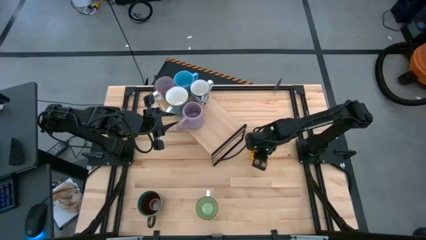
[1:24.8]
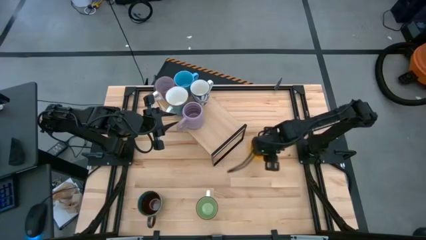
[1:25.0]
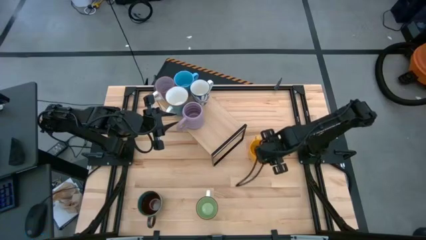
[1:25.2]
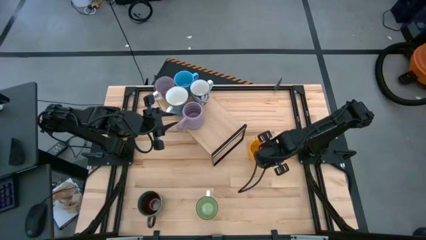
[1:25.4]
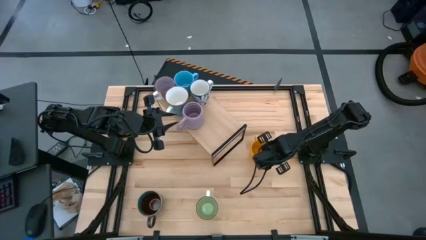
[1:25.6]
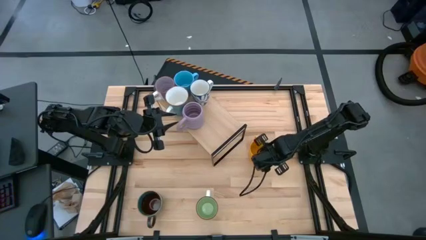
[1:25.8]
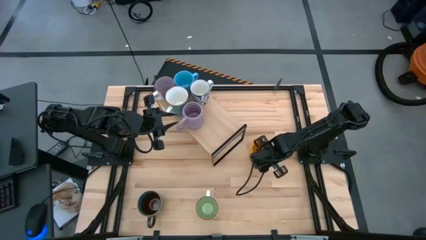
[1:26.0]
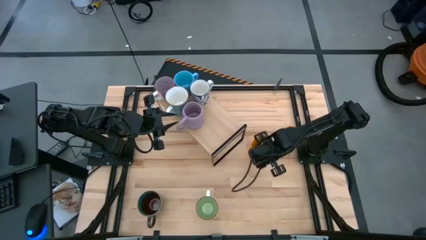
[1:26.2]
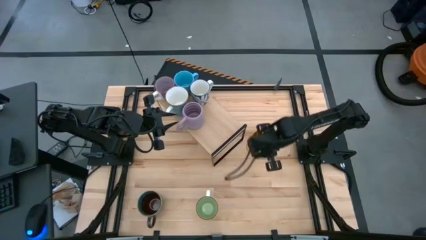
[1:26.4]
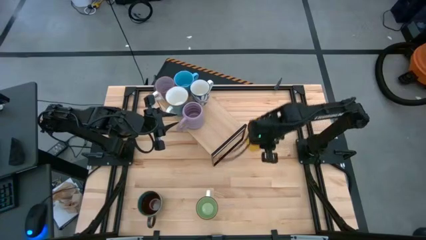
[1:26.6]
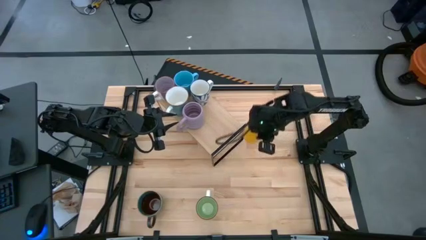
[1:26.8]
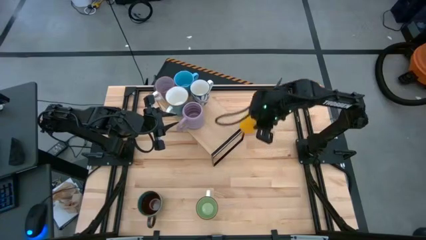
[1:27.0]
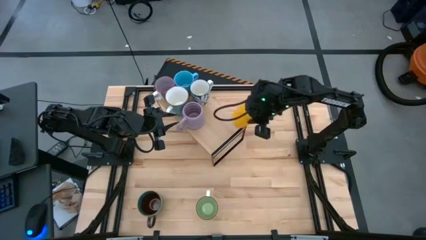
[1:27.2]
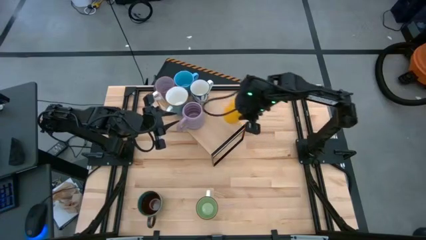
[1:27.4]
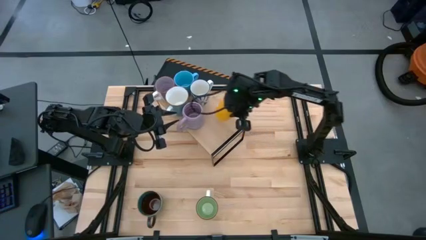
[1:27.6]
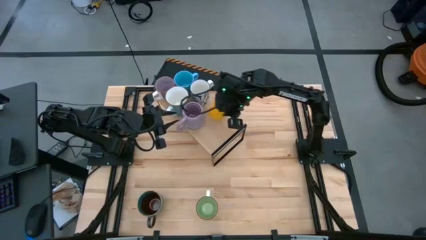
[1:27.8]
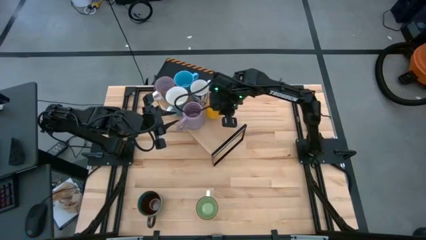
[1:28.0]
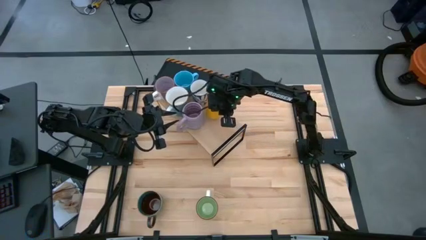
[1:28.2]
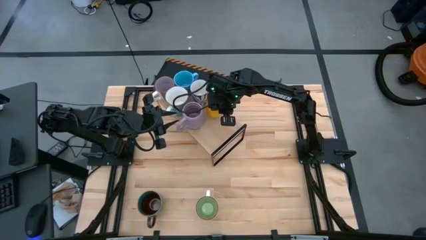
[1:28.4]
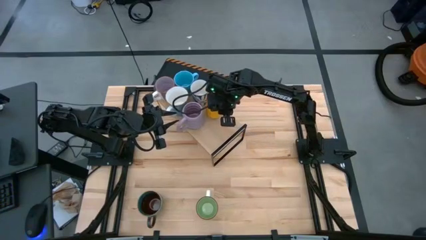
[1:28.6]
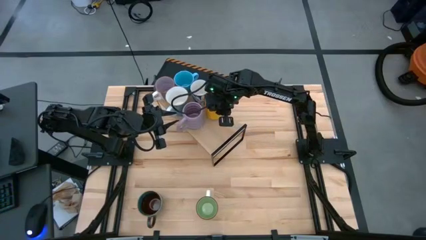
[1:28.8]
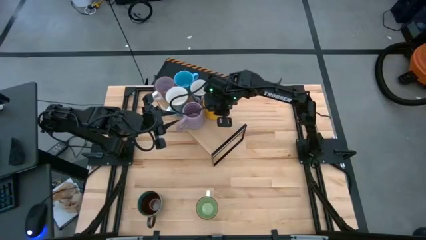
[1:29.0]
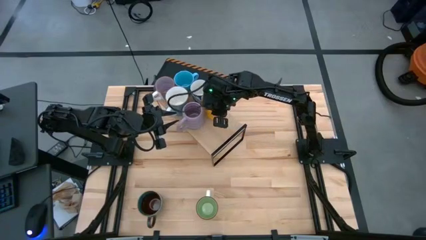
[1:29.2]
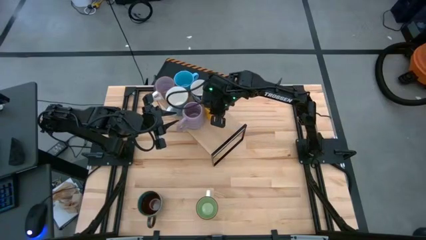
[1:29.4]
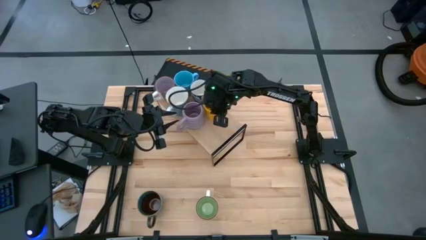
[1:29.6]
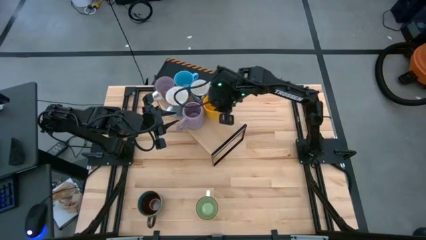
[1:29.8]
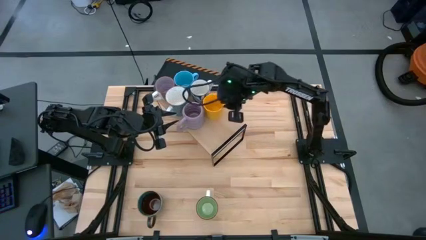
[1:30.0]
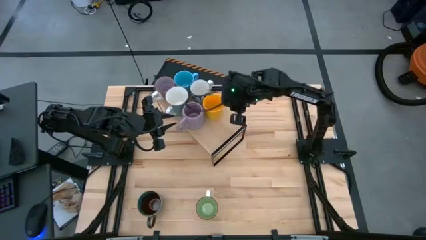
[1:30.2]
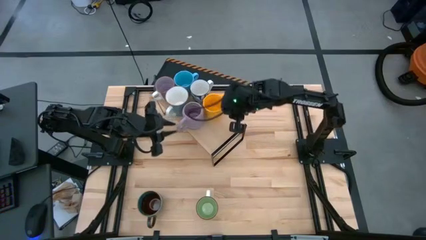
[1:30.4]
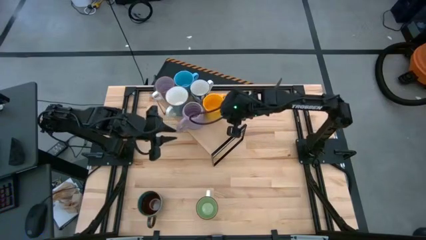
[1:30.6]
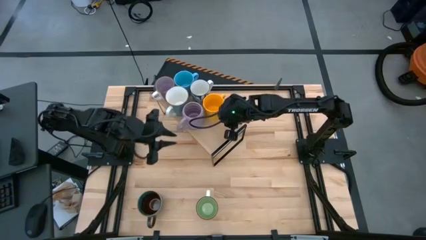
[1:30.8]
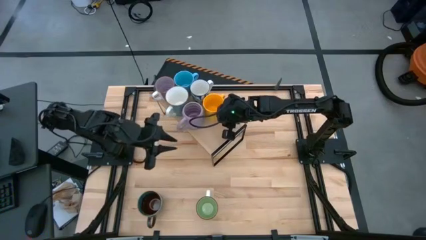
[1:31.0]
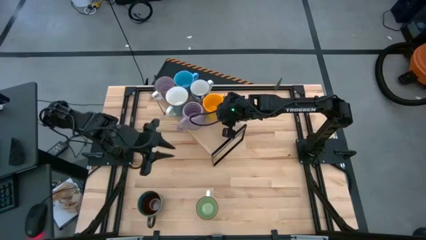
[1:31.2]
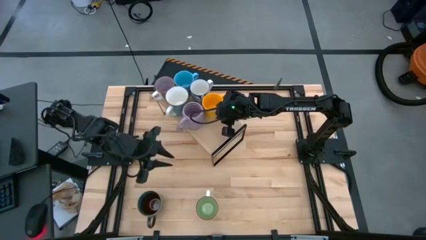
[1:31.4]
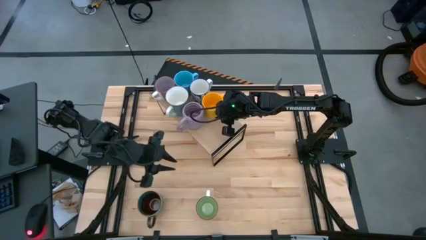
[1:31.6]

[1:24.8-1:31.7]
Task: Place coffee mugs
Put the yellow mug on the shelf

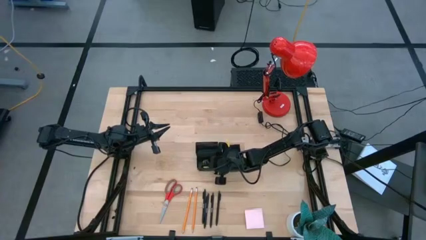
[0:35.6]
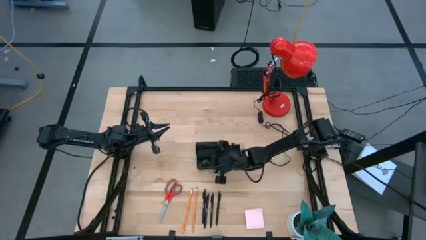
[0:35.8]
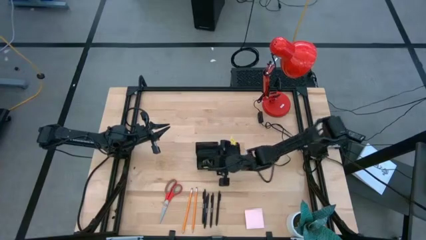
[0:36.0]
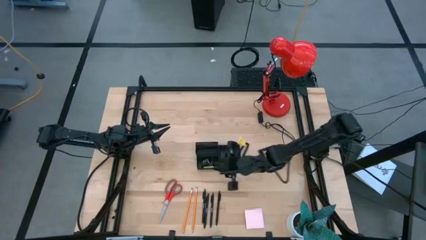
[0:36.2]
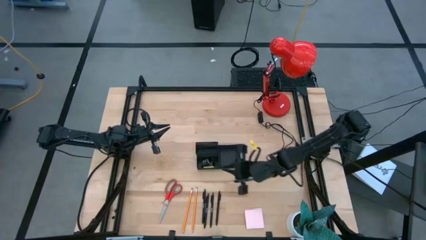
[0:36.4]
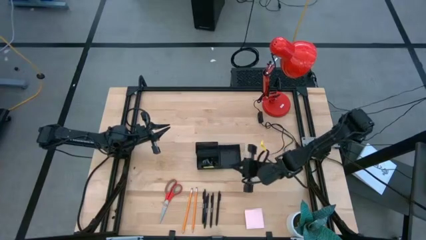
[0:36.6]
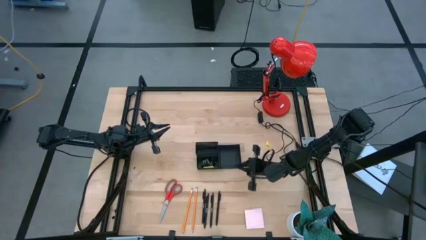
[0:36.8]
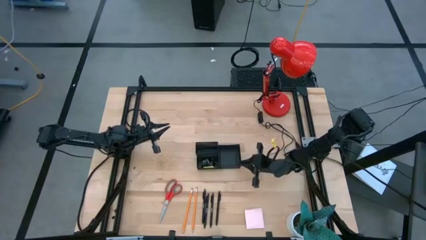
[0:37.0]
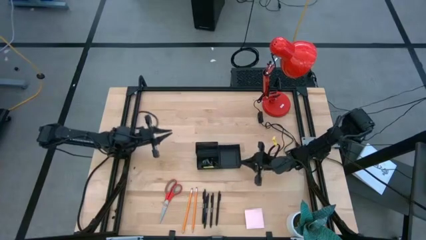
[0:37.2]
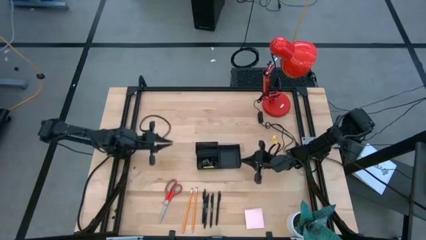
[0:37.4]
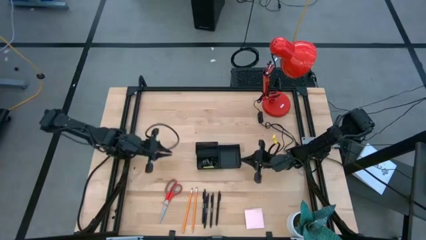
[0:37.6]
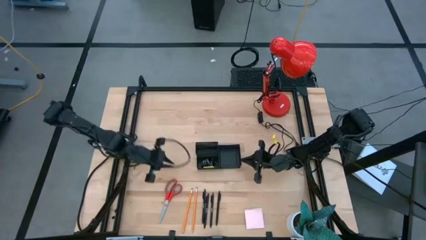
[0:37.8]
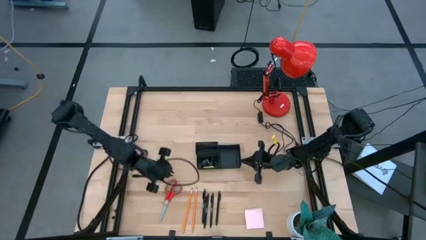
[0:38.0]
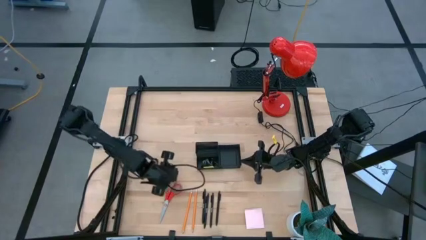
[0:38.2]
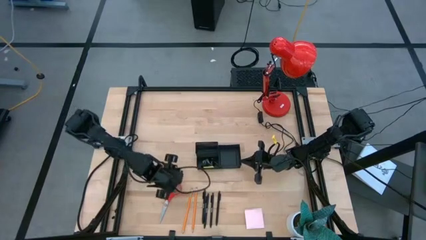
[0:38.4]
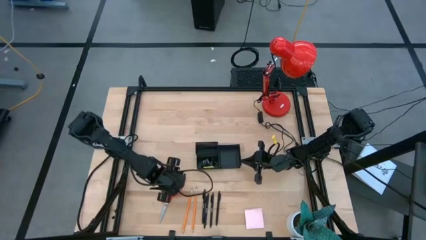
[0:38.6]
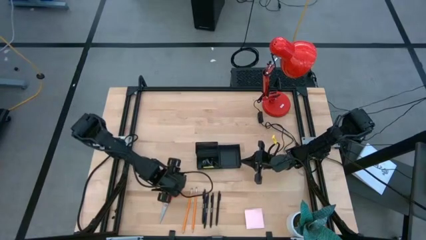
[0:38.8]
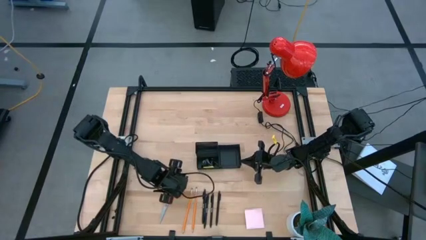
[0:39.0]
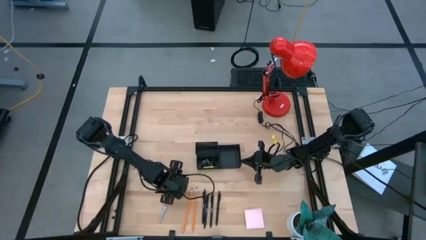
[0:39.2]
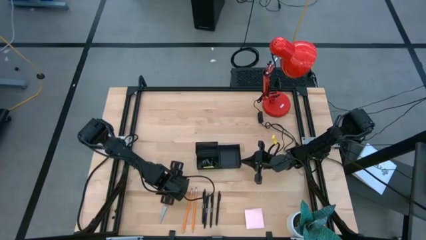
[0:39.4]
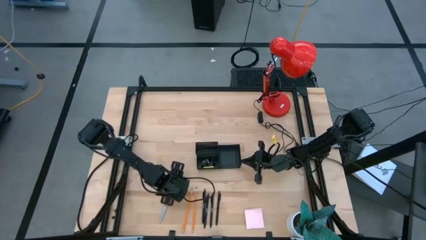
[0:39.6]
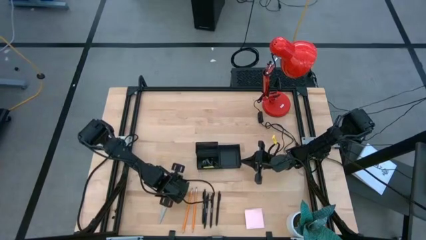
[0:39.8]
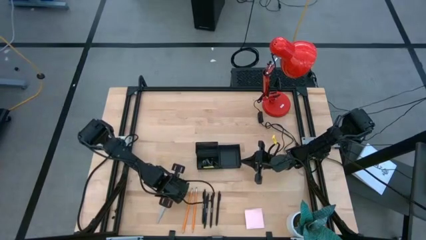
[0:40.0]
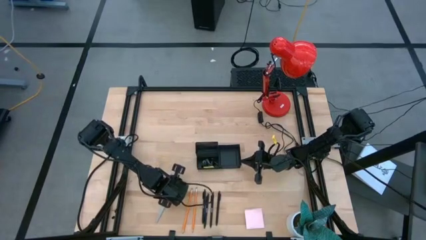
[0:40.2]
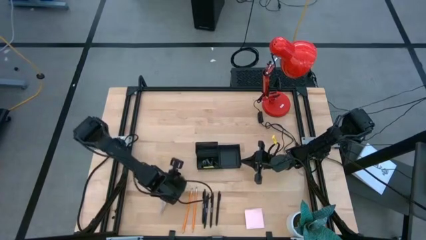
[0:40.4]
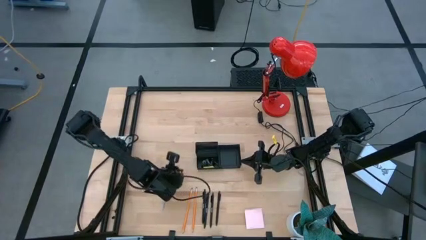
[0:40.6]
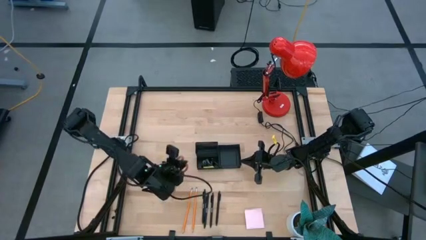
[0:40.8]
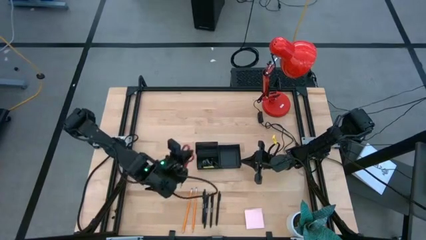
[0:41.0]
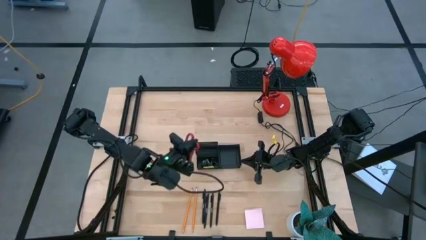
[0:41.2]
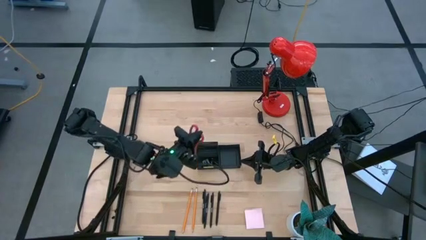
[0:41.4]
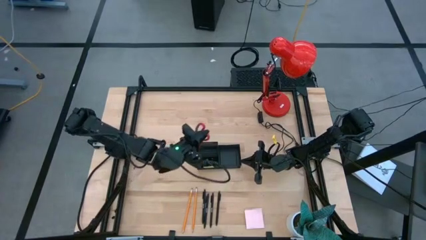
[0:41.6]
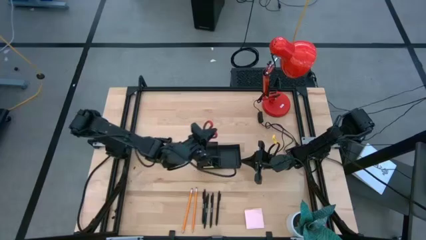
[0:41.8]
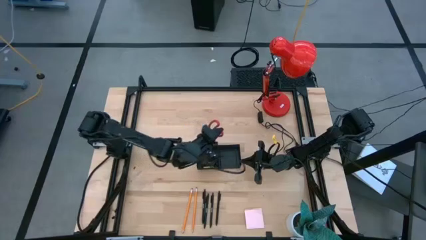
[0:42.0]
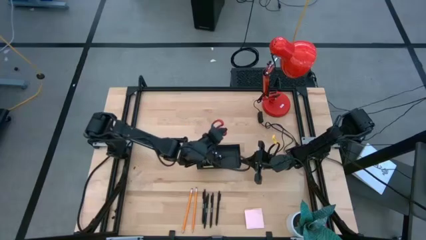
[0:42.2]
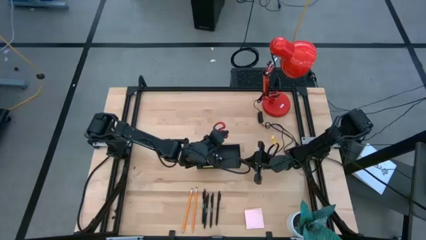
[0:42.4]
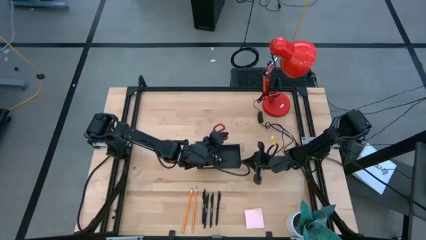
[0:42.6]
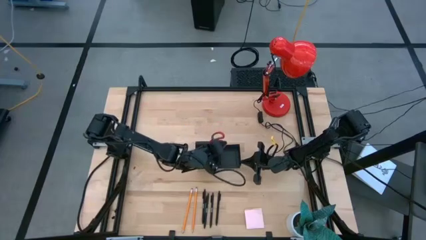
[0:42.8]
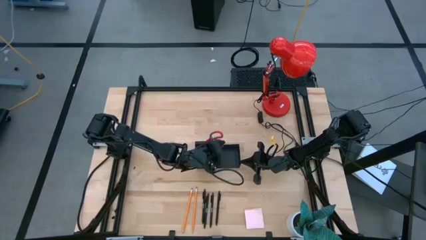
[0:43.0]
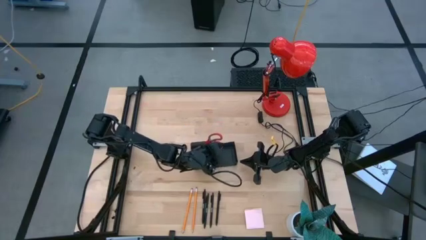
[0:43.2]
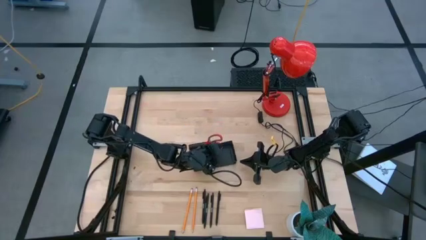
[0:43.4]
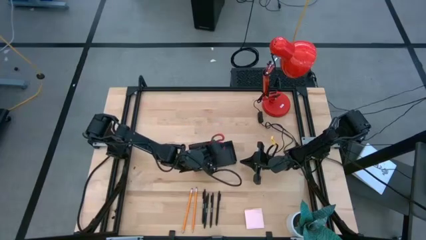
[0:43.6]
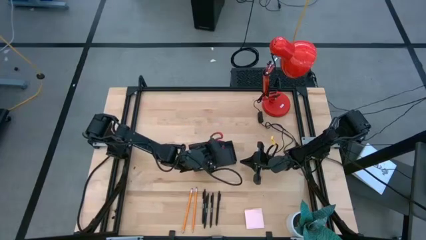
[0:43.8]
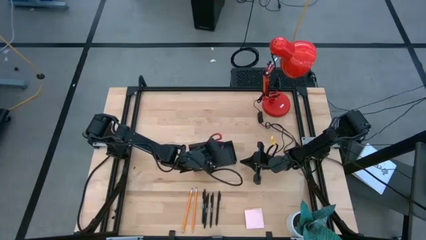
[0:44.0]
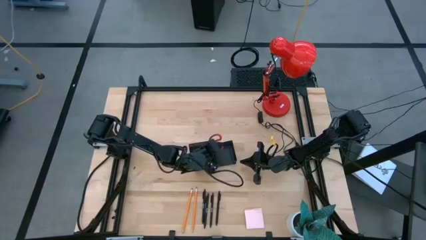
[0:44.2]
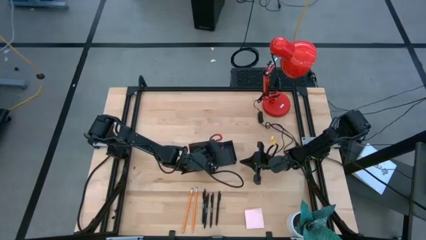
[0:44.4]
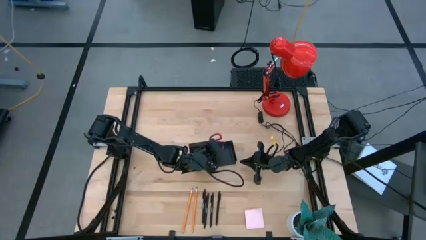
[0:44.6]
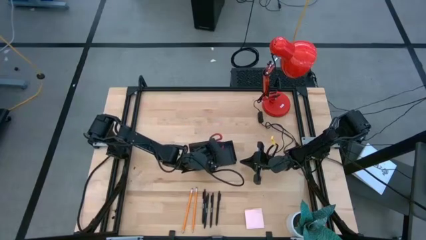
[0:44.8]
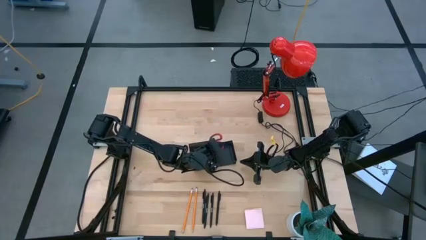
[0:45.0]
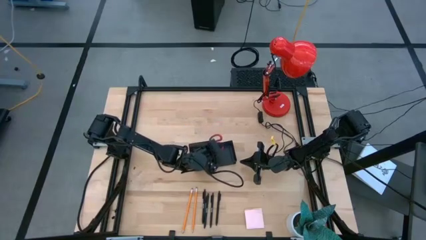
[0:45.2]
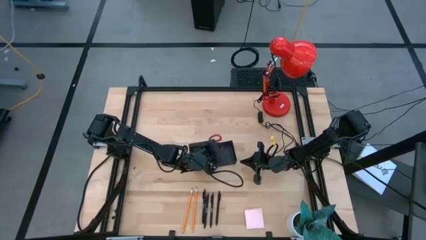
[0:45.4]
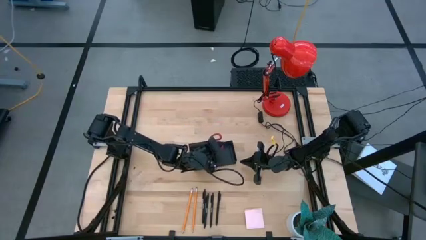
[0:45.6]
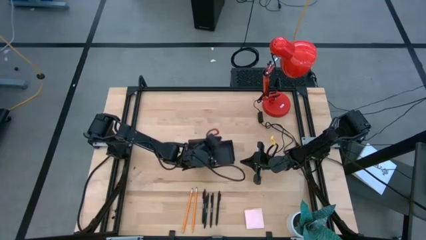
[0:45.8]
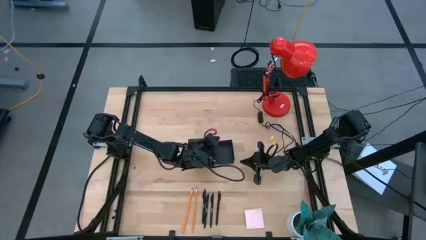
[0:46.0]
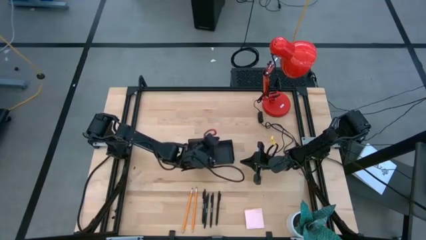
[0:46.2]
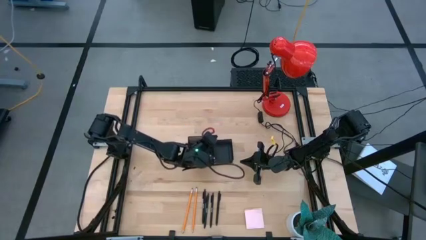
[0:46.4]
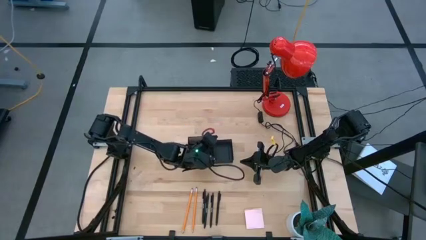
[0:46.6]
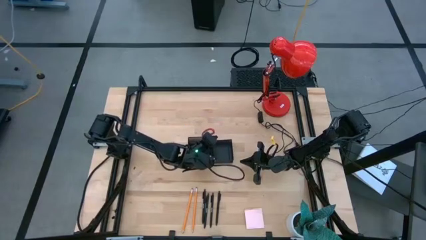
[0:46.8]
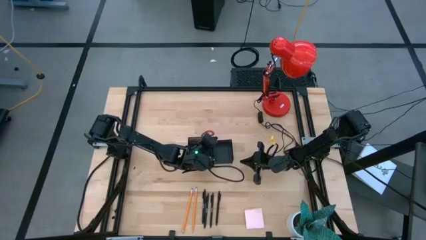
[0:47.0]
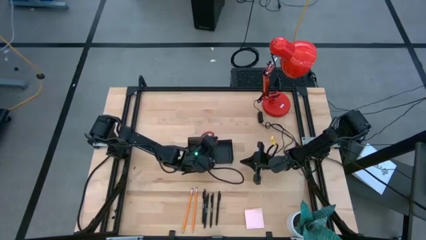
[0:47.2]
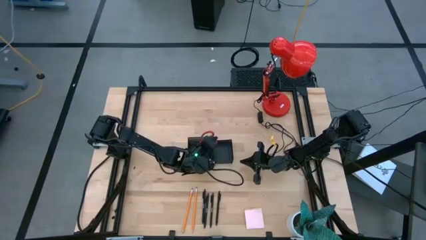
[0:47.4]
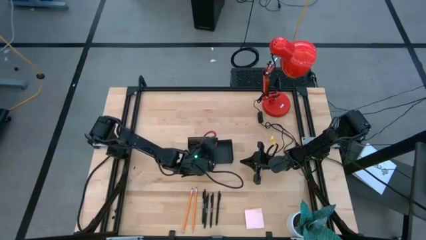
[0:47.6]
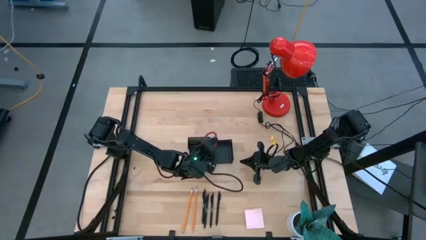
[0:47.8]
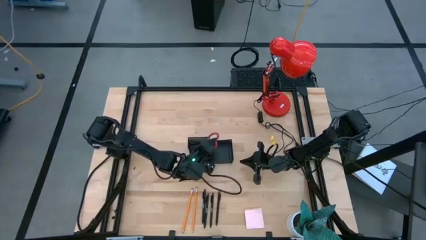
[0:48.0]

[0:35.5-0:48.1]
Task: Pick and place office supplies into organizer
Put the red scissors into the black desk organizer
